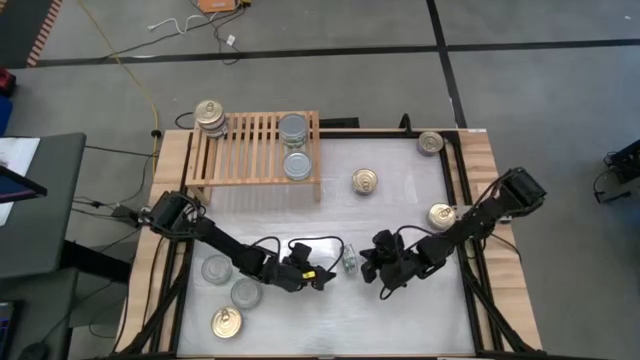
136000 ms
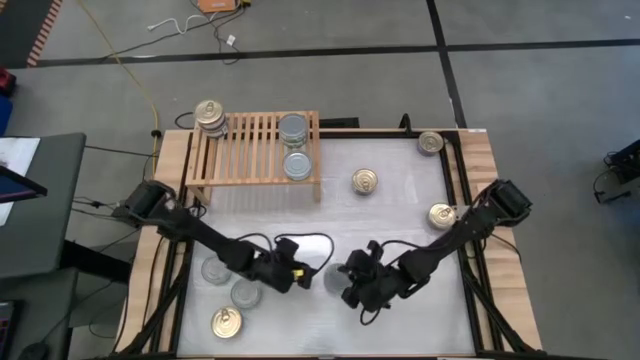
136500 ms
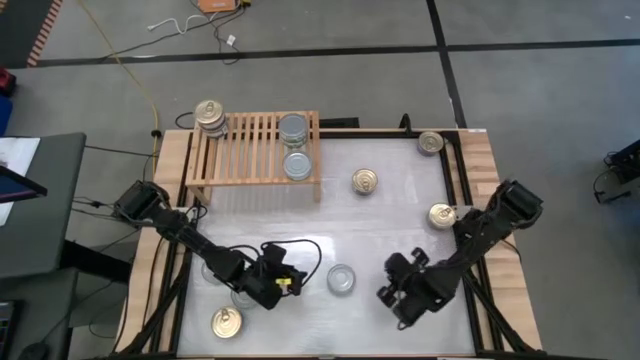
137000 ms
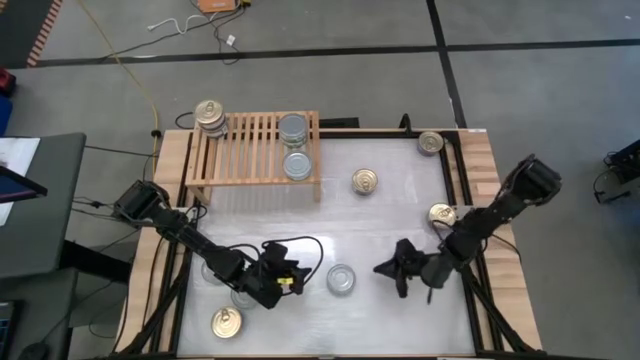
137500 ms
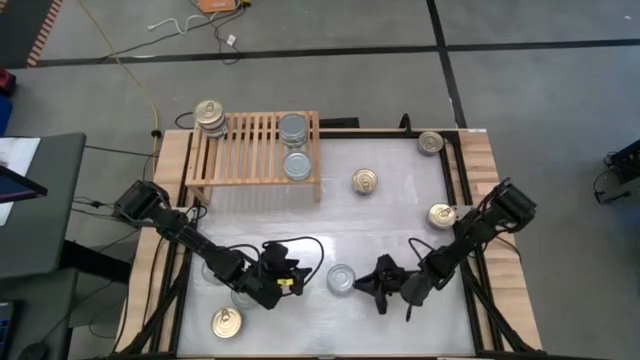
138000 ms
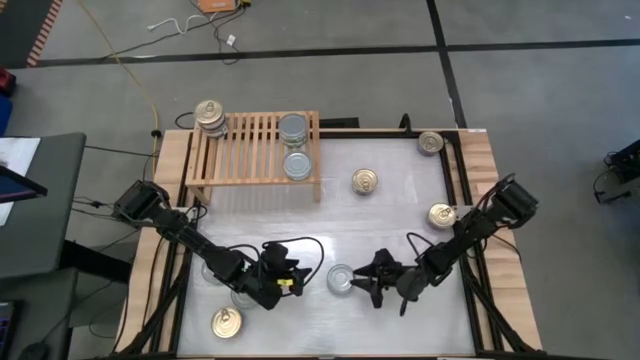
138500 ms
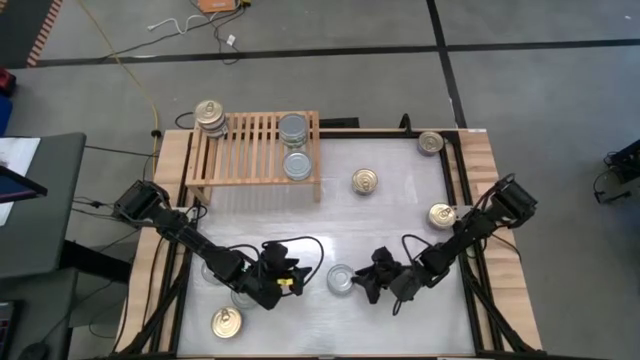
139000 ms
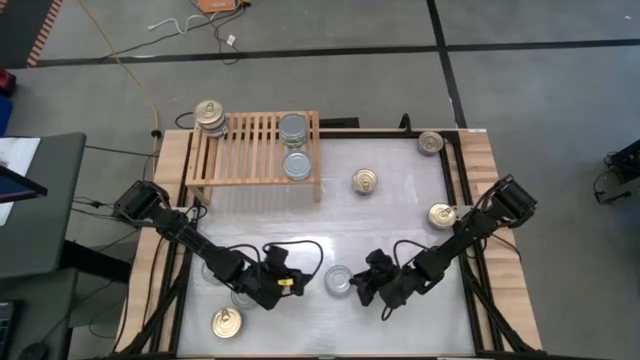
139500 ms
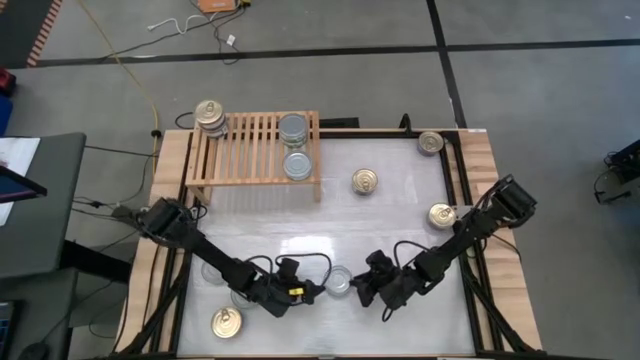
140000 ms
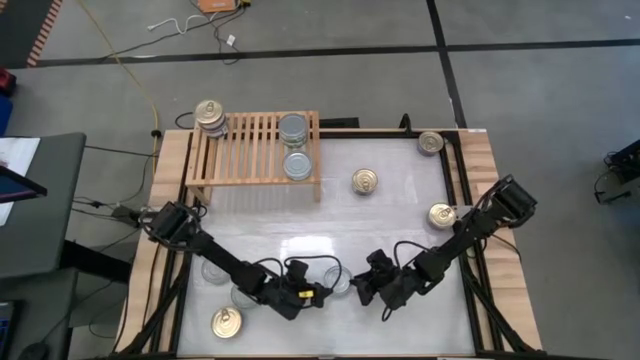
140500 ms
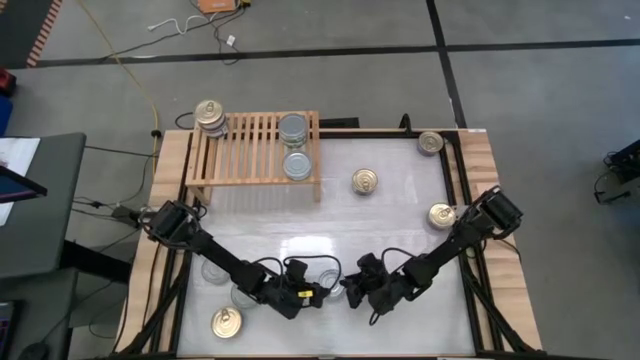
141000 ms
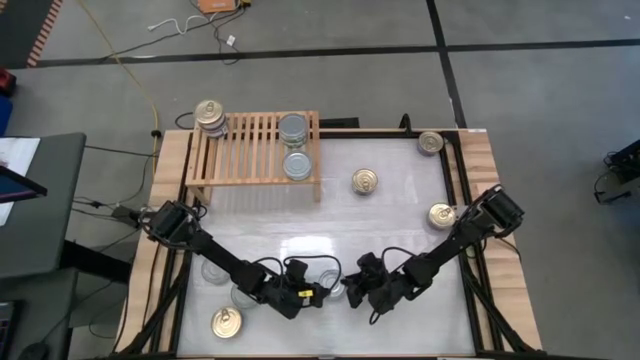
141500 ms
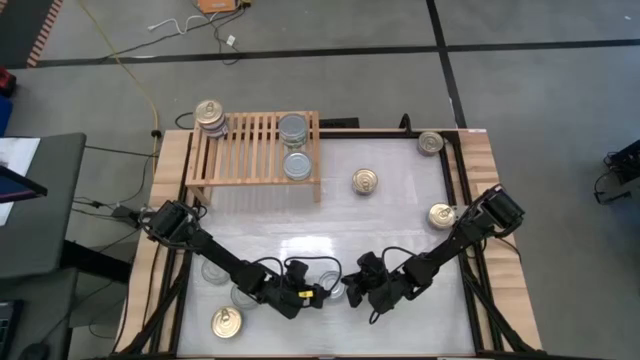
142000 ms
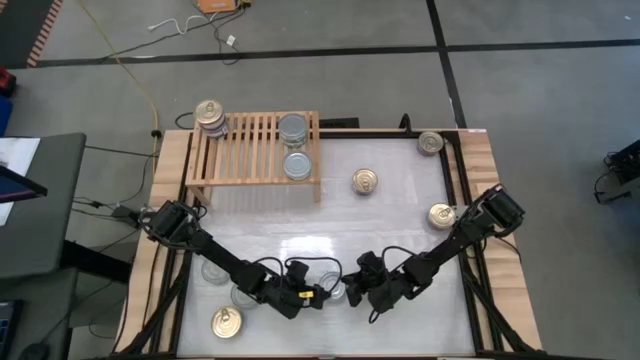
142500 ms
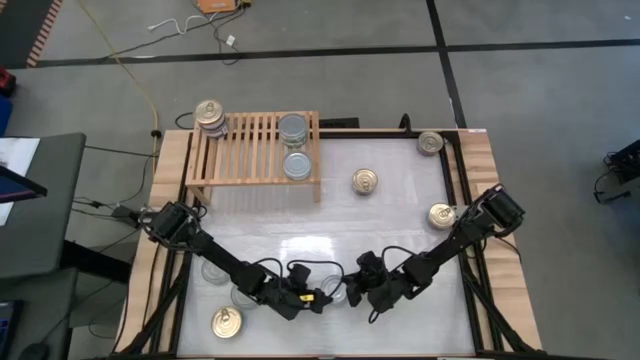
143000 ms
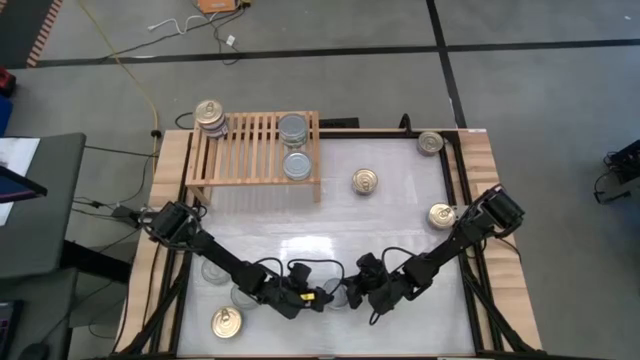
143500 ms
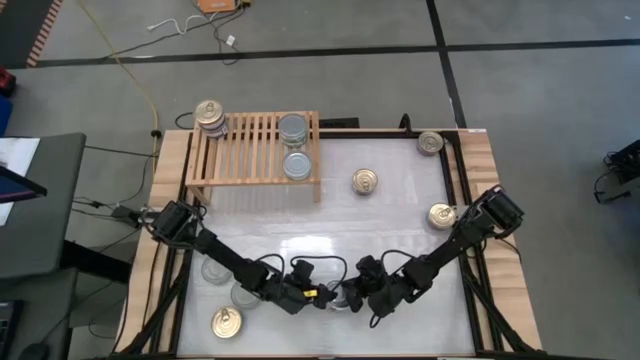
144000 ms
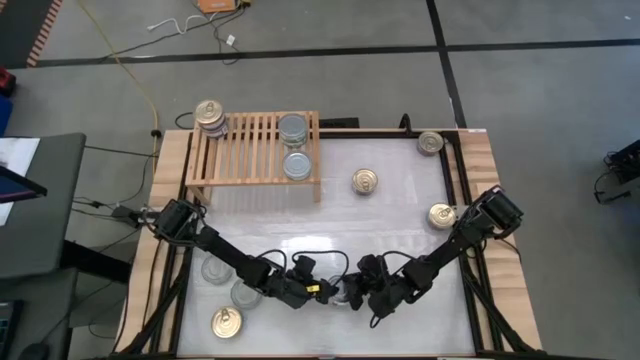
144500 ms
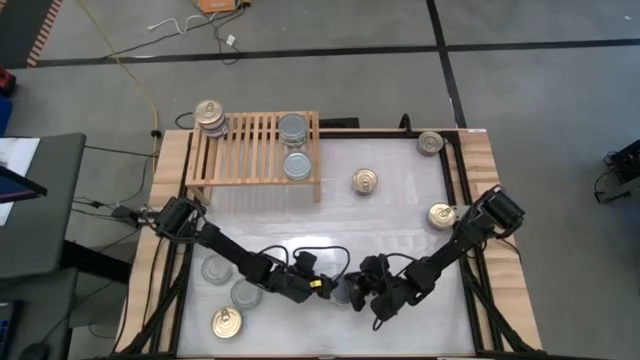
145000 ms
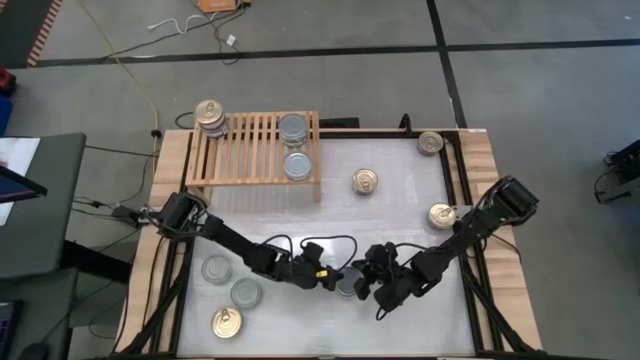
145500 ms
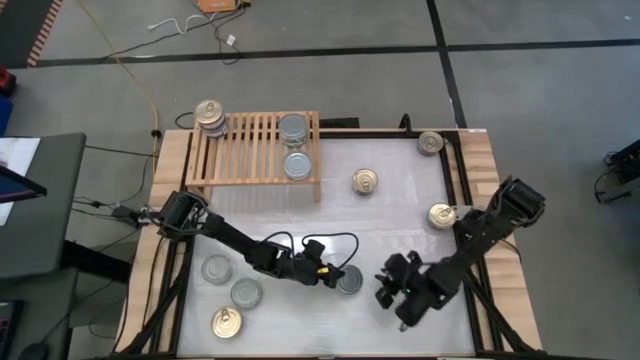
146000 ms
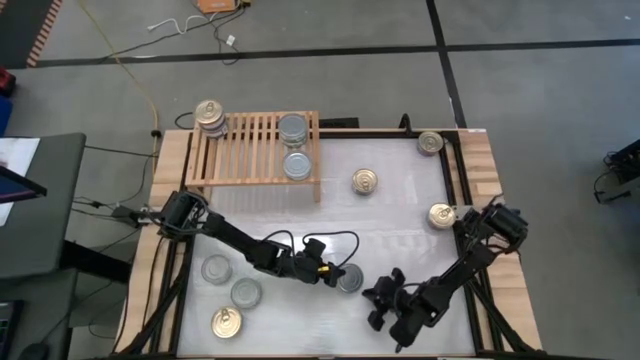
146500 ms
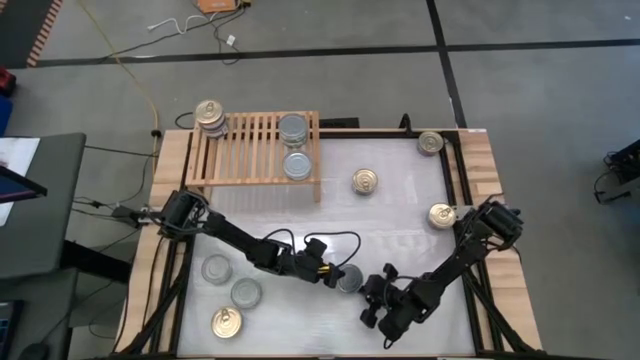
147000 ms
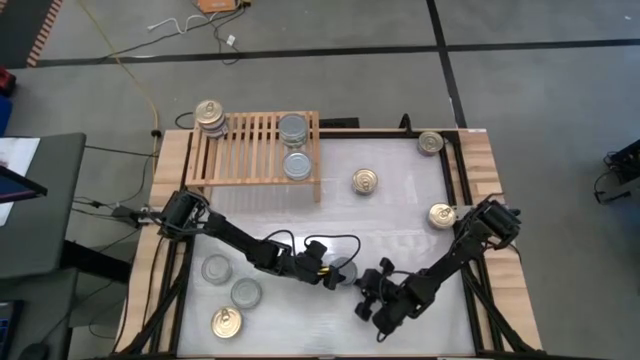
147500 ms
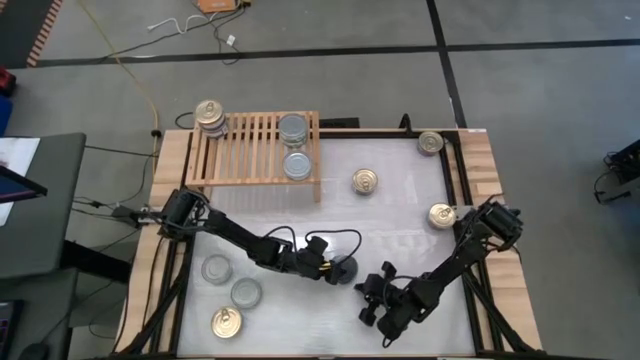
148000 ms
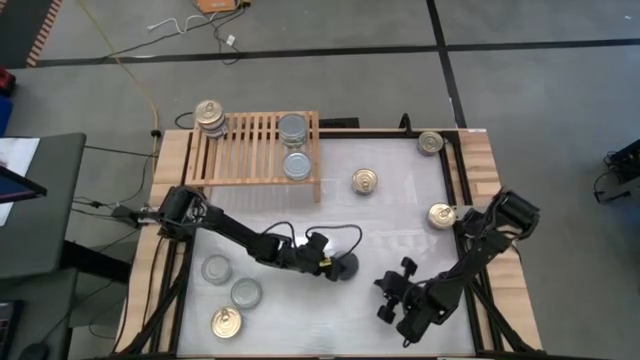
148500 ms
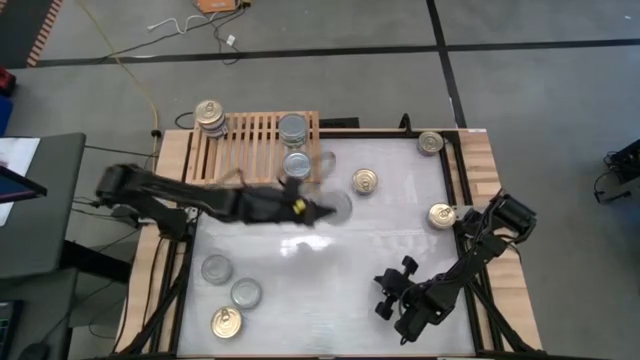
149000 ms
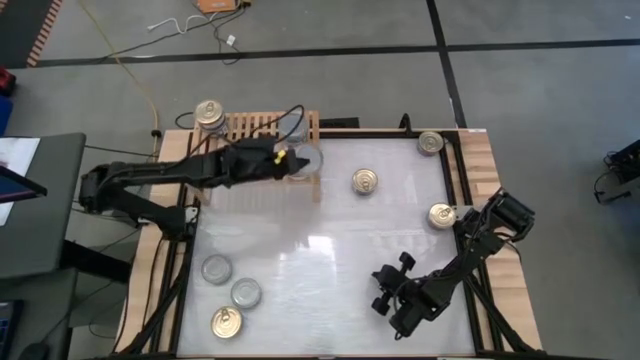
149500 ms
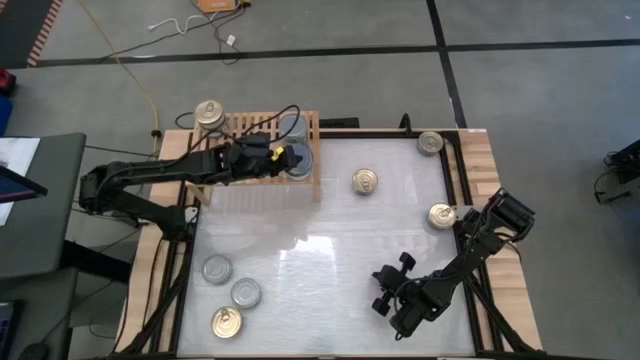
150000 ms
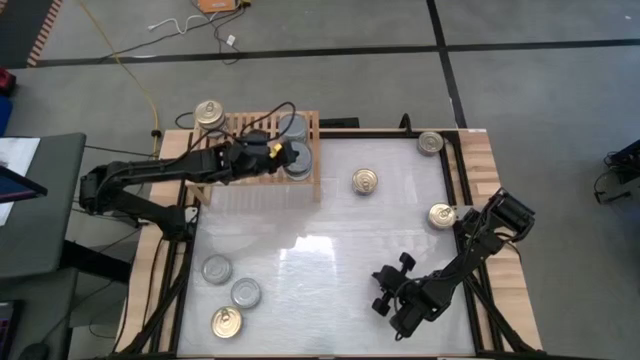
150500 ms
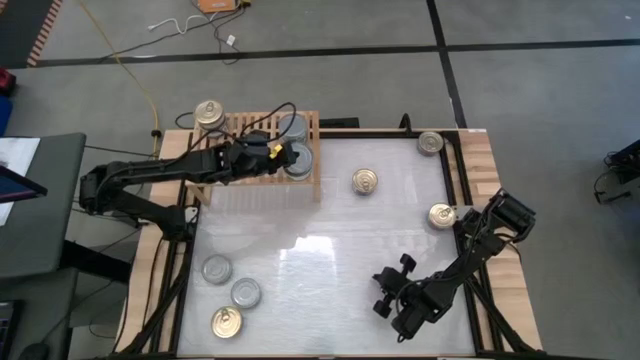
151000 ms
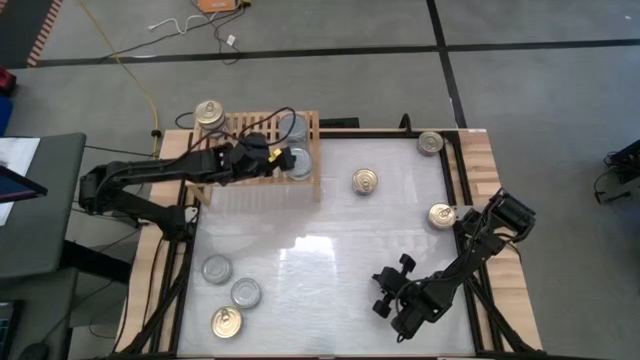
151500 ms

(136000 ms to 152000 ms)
Task: Stack canned seafood by type on shelf
Stack the green tuna can on top of the bottom green tuna can on the shelf

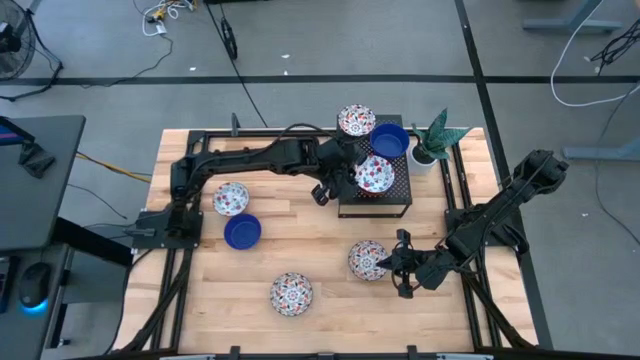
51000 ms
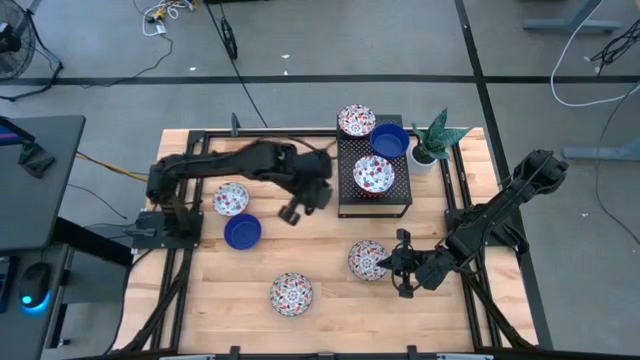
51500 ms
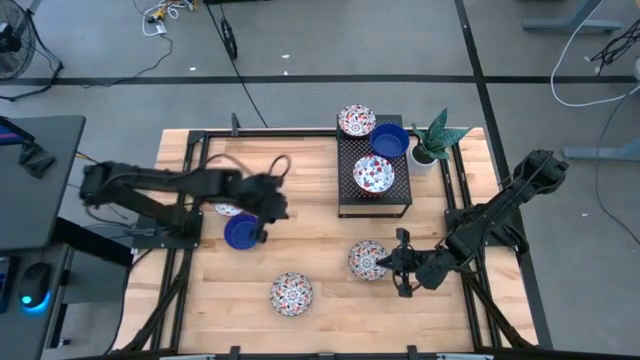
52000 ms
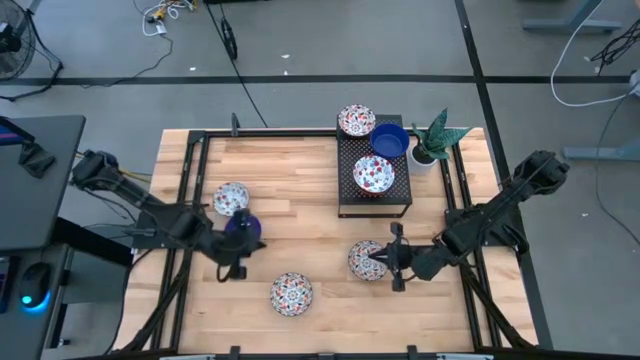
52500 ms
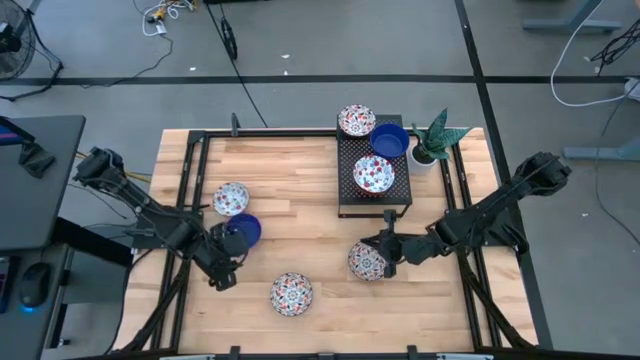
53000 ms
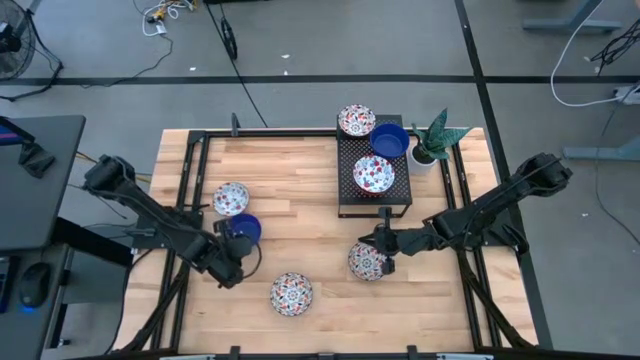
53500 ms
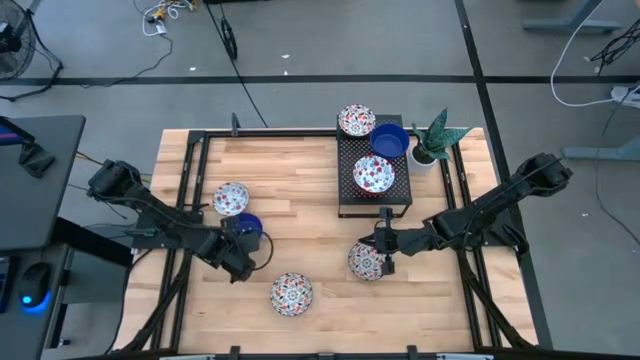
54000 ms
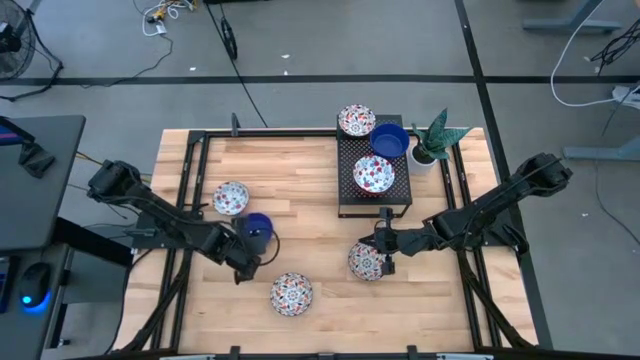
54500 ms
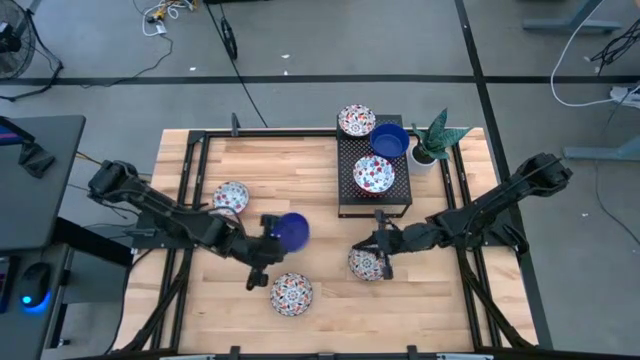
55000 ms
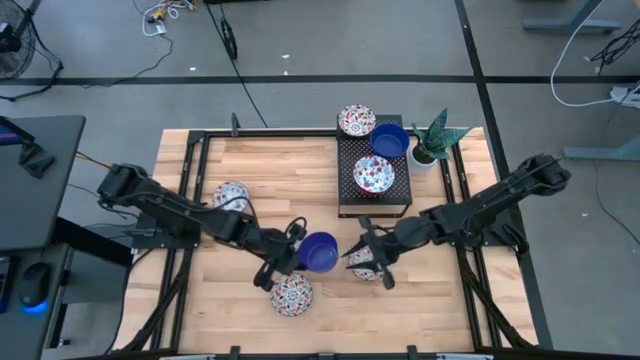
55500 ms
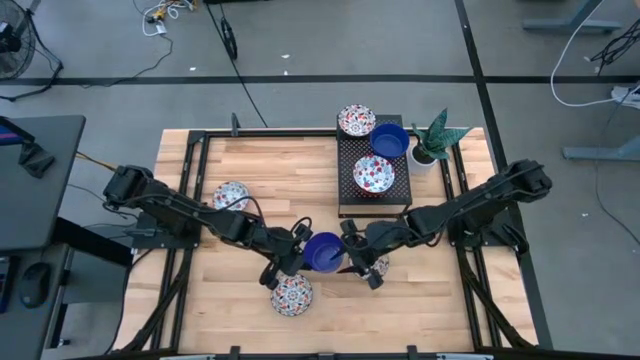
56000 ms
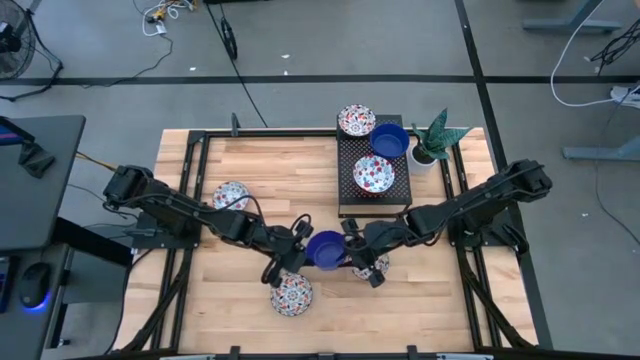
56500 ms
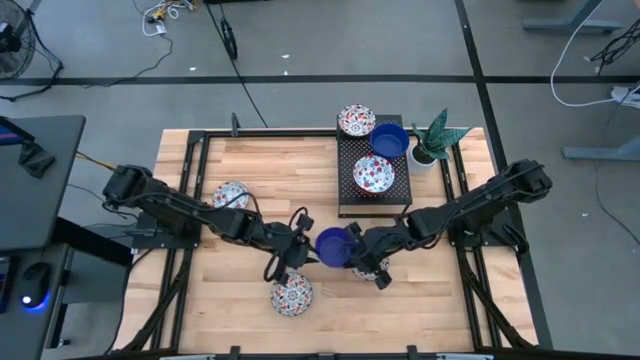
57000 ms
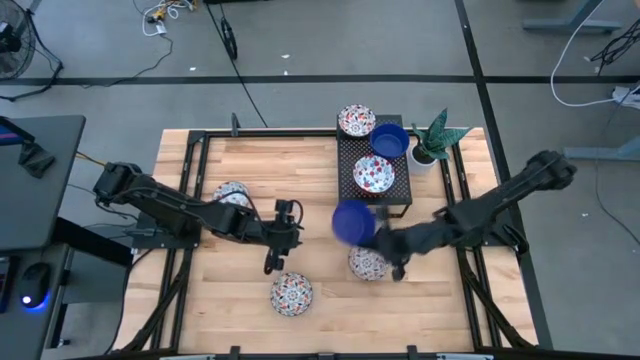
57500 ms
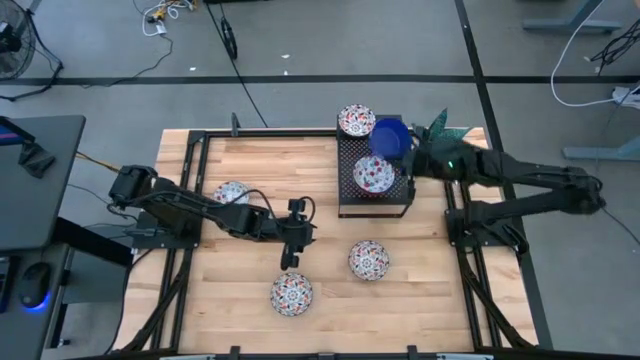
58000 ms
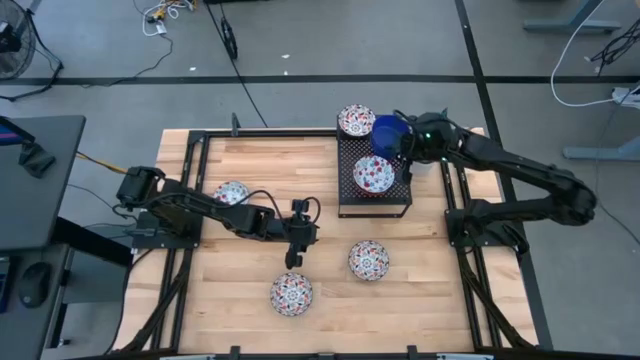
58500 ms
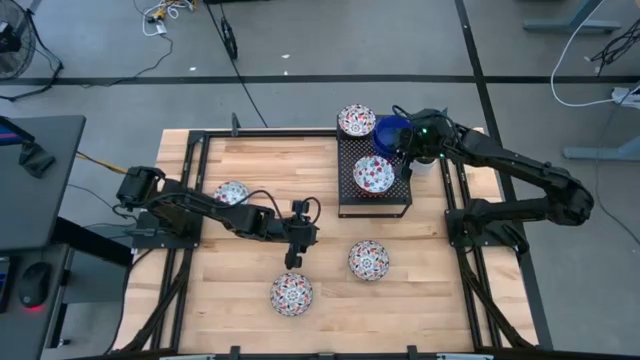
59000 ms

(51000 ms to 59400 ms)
Task: Pick & Place Mini bowls
Stack the blue bowl on top of the other blue bowl on the shelf
